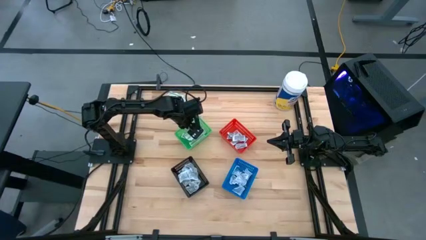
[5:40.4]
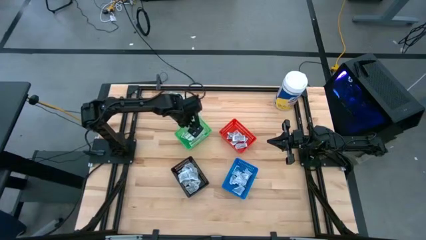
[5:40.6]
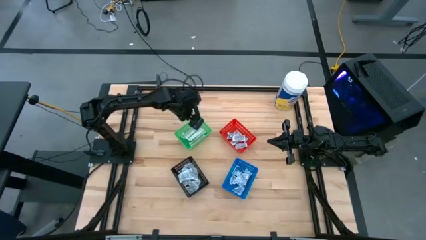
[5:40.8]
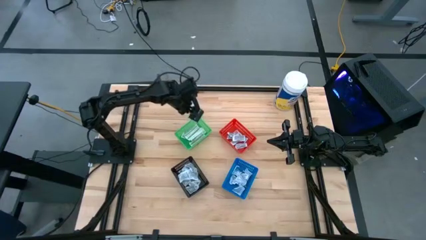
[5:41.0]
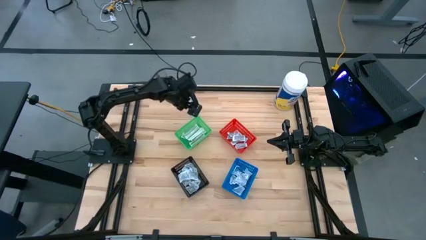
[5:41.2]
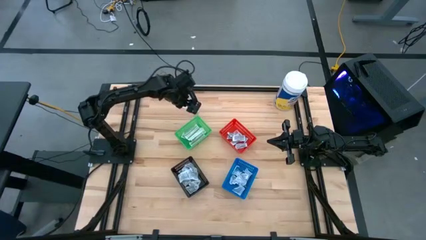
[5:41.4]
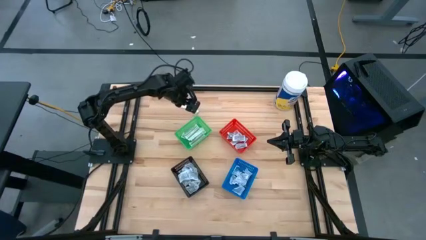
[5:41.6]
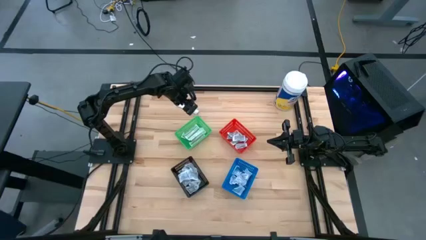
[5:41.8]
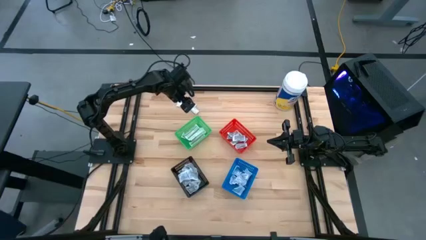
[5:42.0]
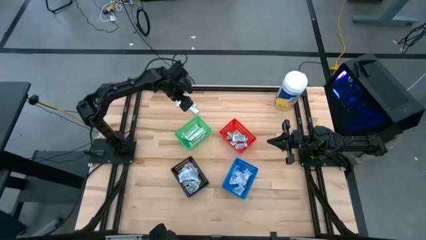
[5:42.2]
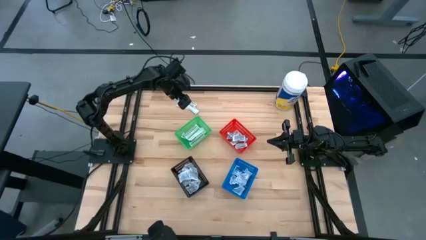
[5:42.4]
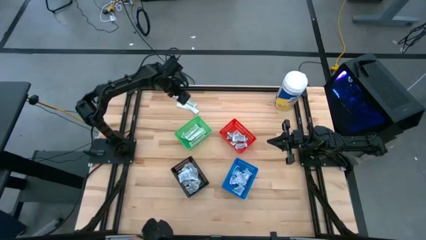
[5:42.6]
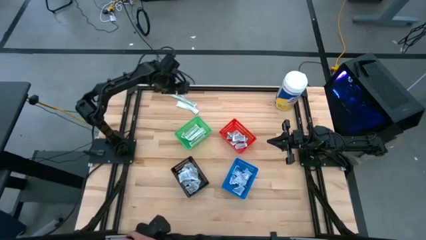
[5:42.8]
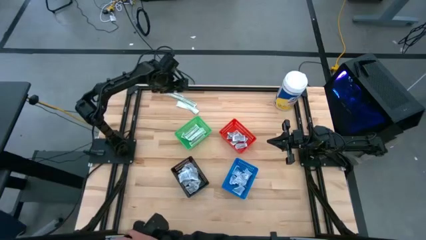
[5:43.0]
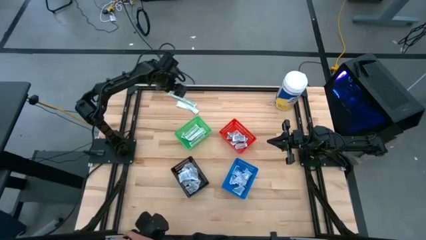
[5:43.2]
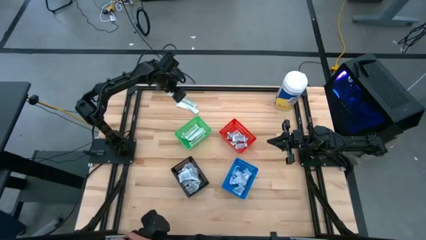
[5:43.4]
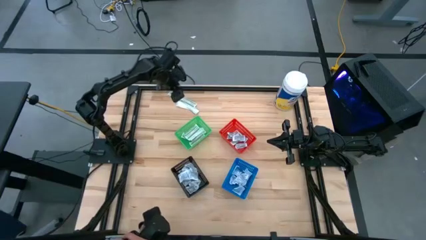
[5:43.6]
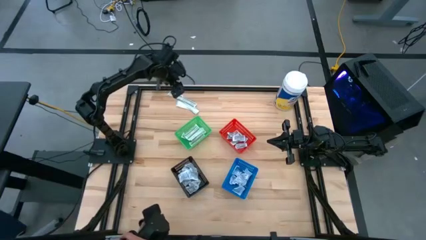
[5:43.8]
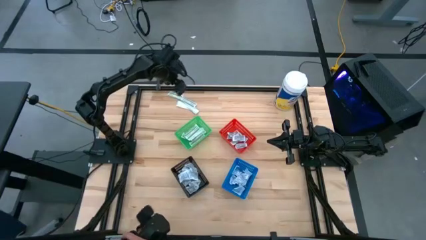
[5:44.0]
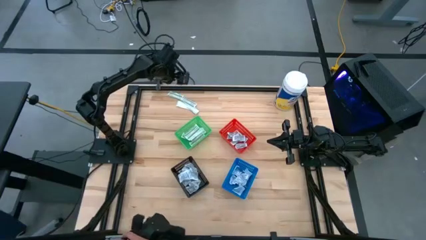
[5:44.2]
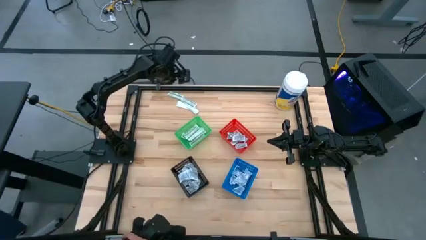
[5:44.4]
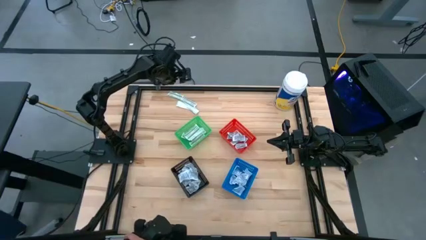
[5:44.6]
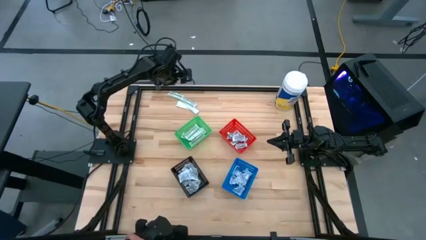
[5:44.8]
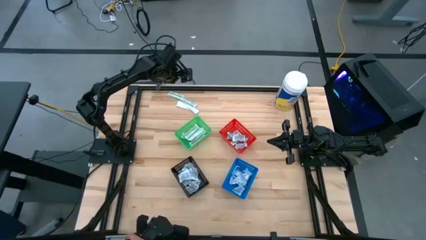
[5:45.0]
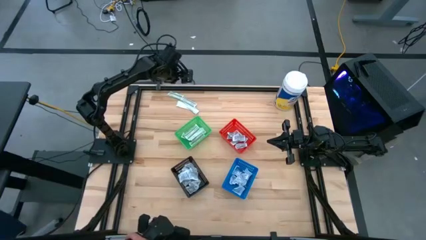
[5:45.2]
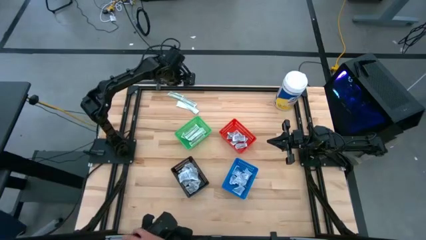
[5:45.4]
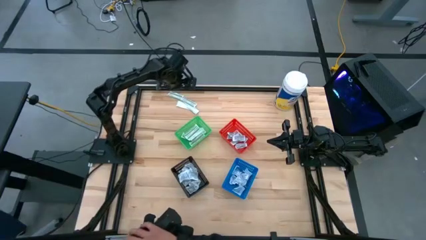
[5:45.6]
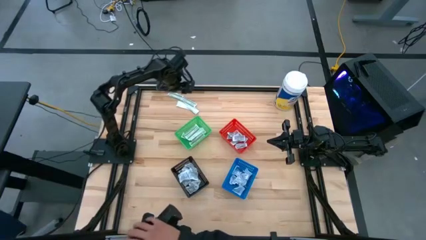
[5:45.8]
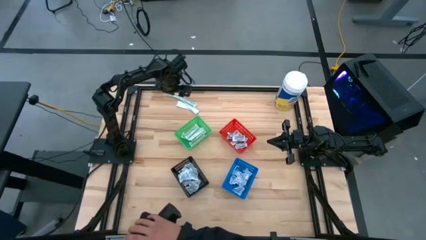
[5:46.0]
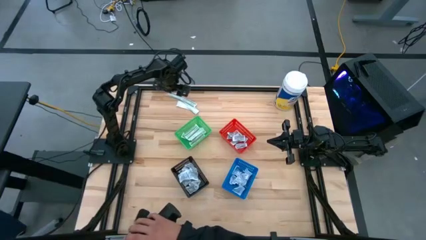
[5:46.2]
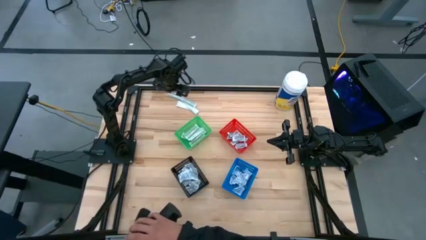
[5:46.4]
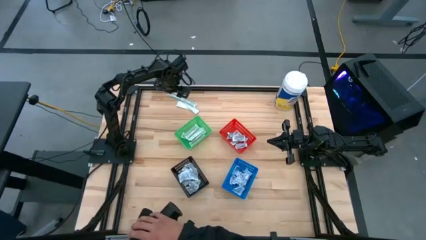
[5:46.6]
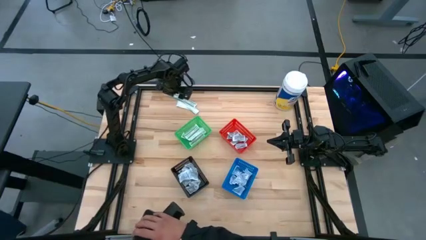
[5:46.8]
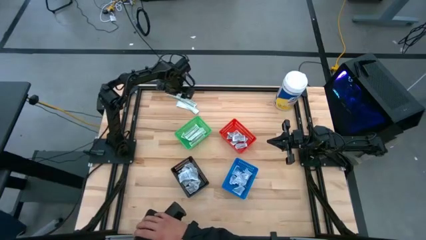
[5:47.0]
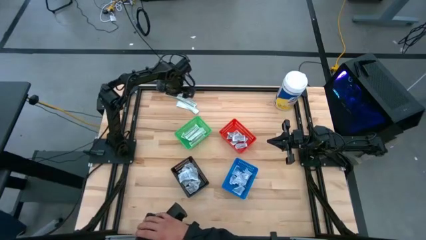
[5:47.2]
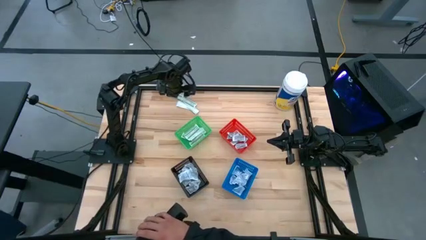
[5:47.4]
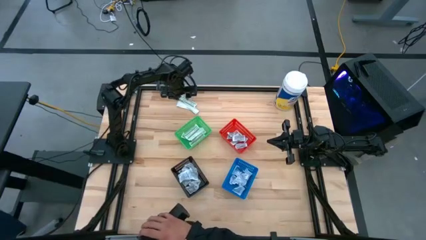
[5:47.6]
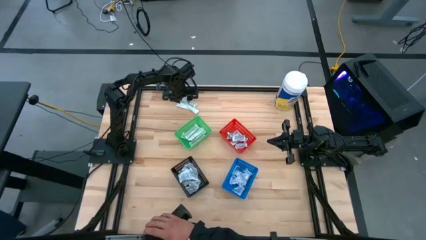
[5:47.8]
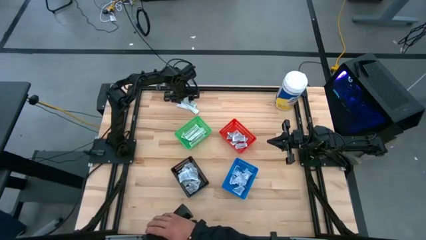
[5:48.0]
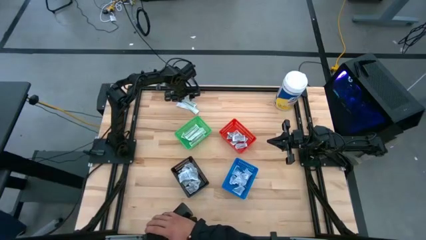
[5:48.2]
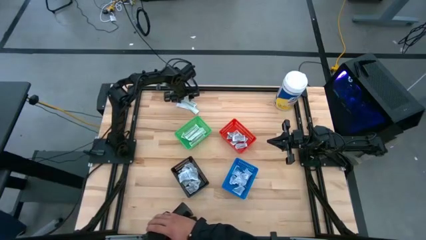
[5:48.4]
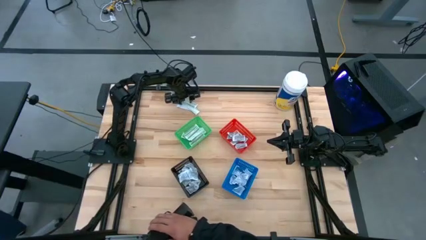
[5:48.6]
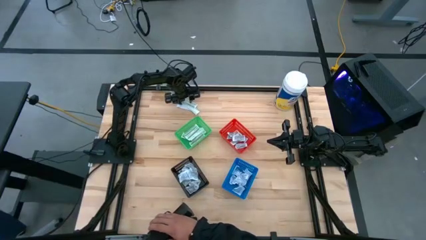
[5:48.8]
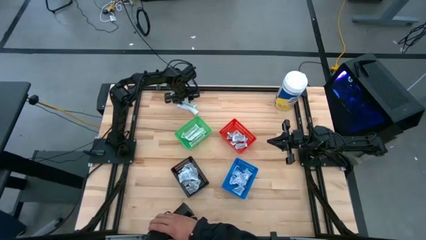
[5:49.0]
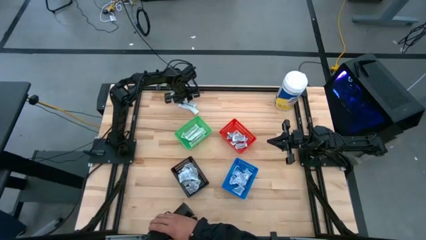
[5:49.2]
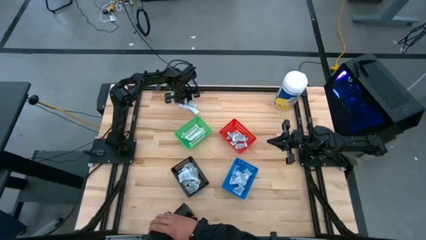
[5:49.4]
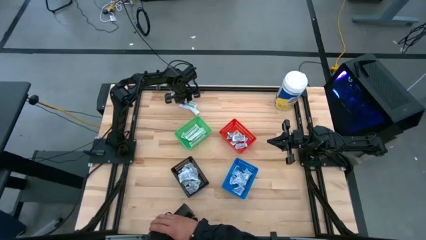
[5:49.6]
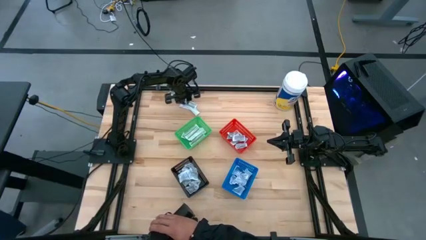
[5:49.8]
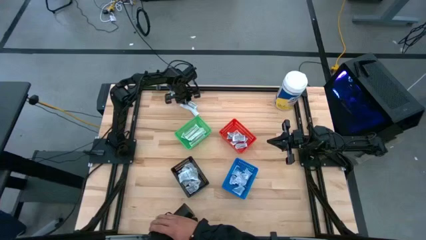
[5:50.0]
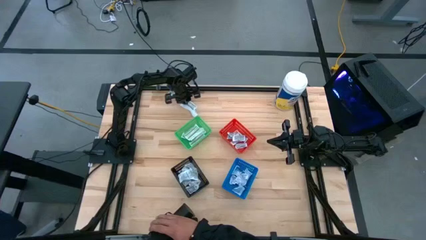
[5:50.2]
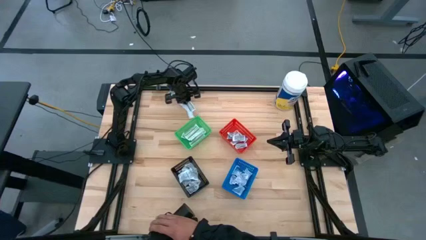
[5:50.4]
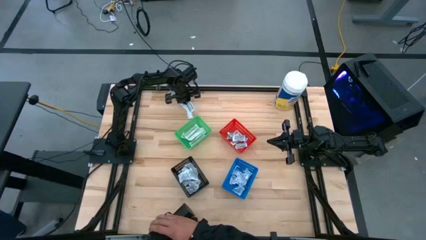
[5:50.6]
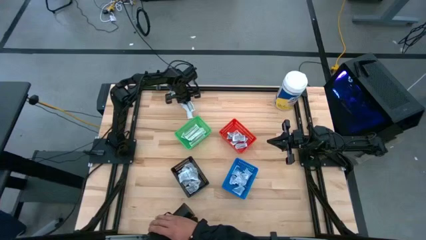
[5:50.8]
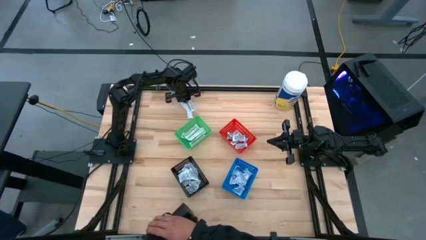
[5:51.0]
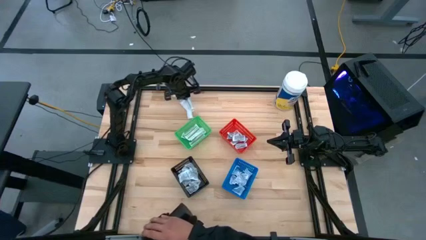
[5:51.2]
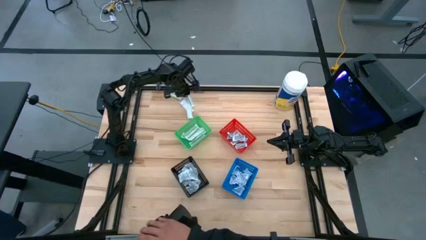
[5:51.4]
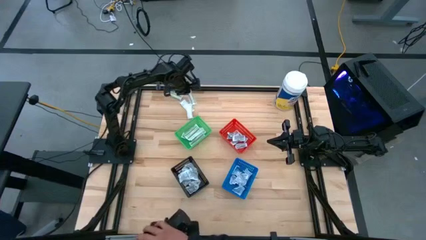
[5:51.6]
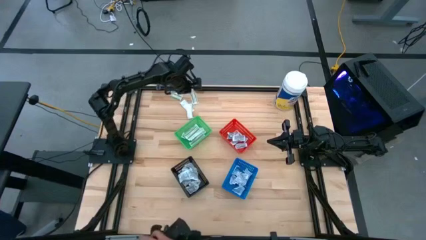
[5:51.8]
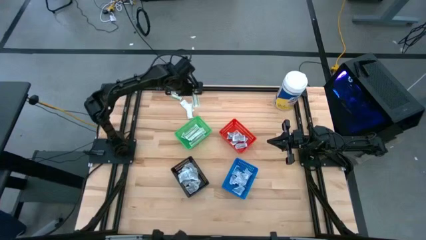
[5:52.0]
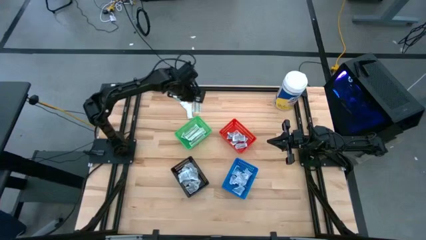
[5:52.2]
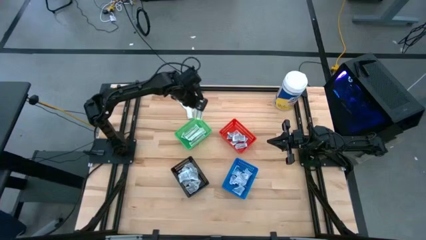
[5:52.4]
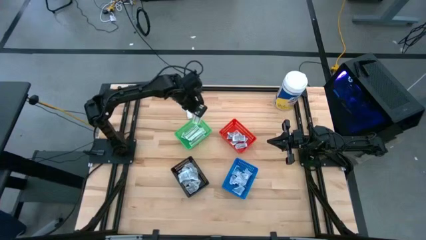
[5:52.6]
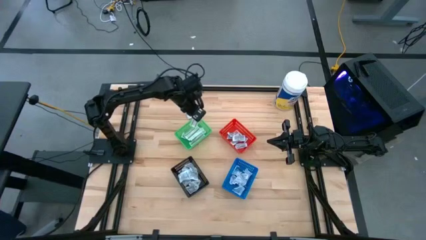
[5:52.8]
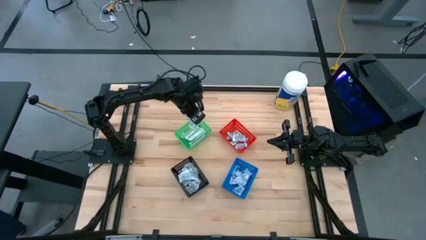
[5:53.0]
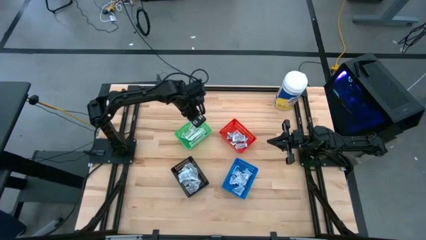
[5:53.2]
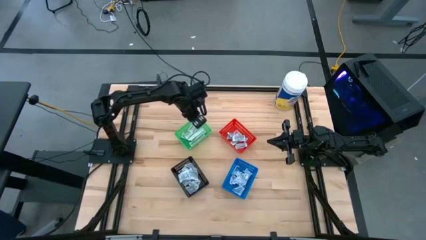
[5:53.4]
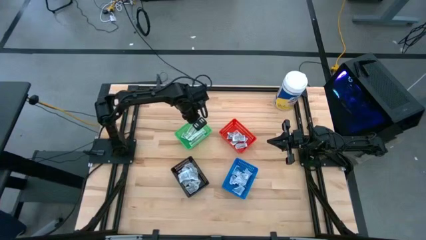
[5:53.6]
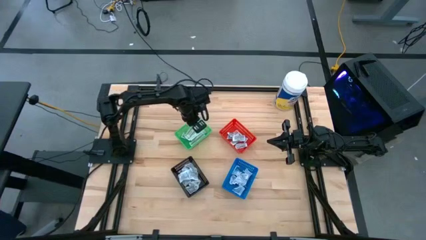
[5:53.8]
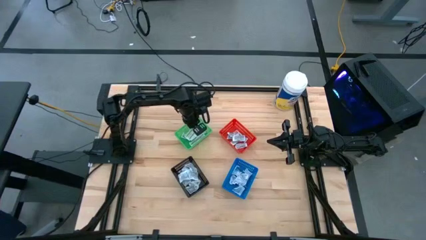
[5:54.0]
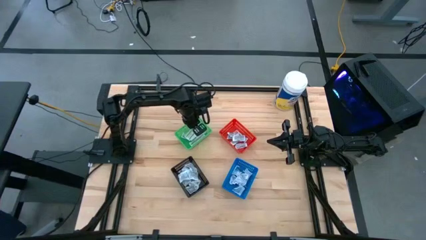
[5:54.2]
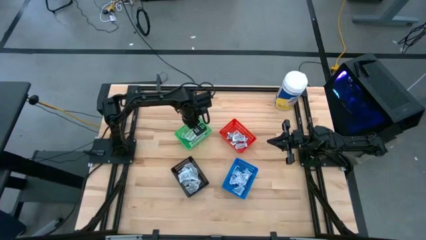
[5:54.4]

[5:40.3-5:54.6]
Task: Pick & Place First Aid Supplies
Put the green bandage pack into the green bin
